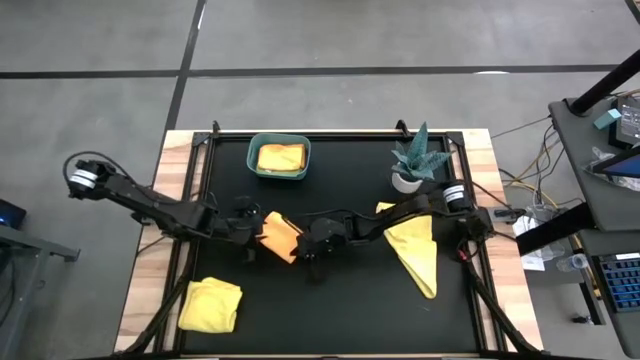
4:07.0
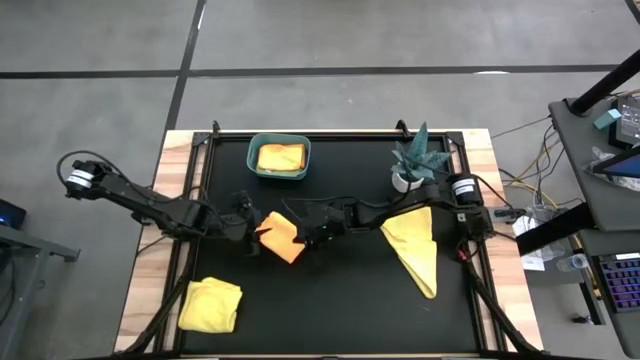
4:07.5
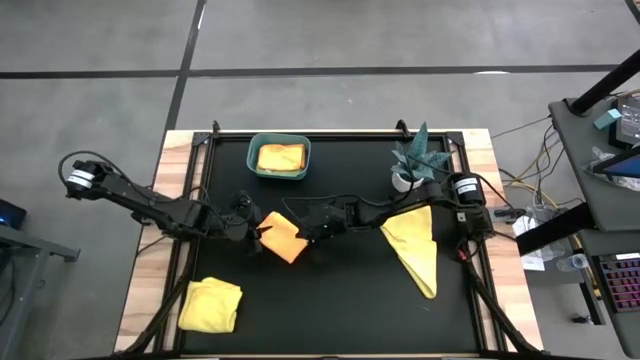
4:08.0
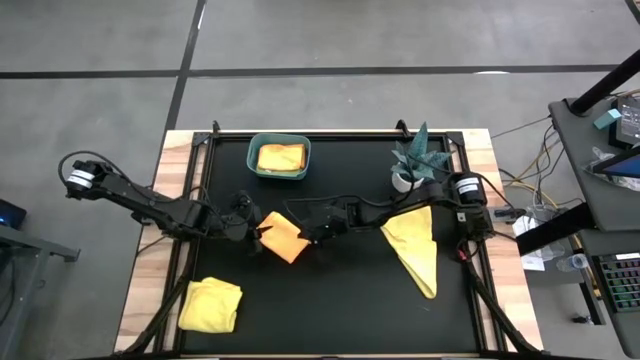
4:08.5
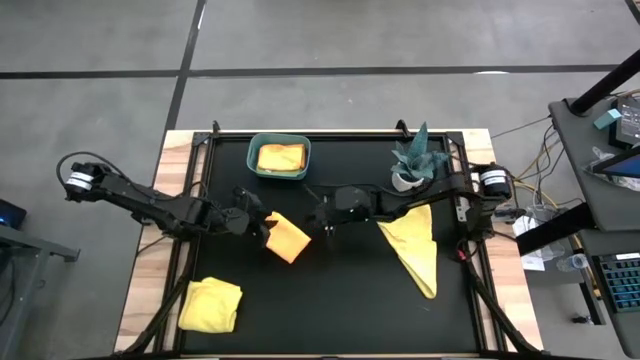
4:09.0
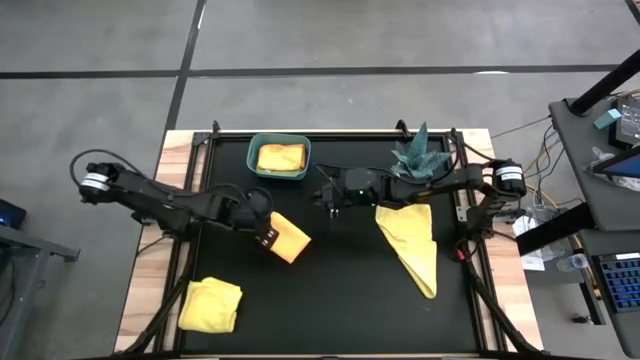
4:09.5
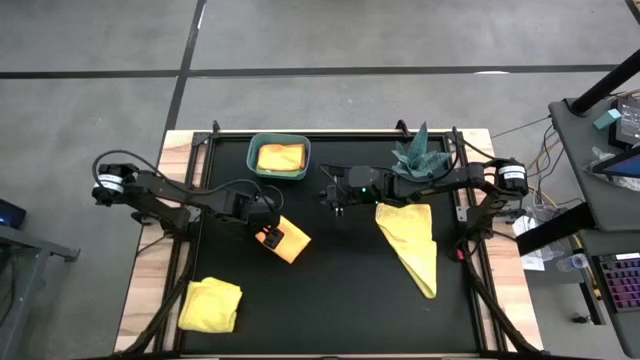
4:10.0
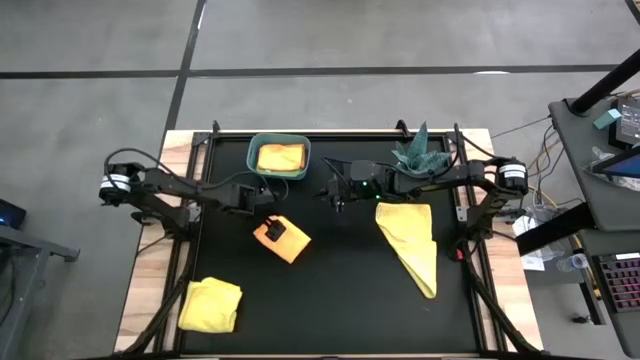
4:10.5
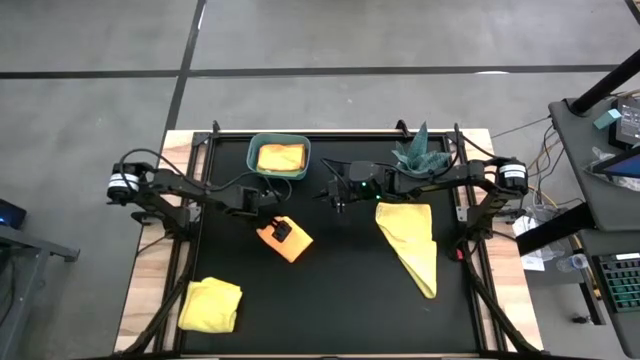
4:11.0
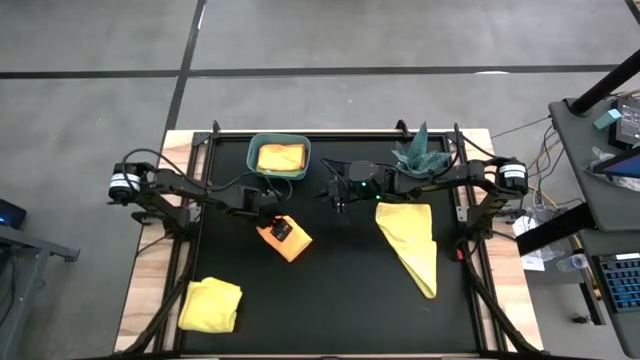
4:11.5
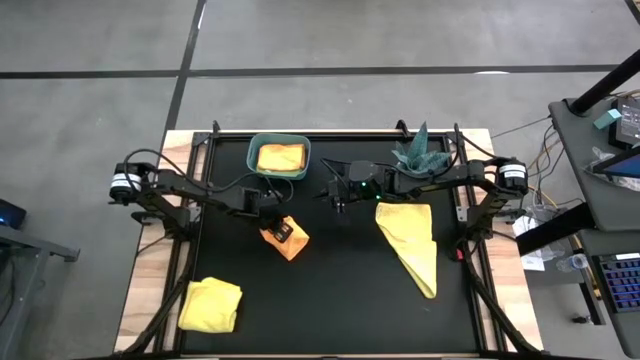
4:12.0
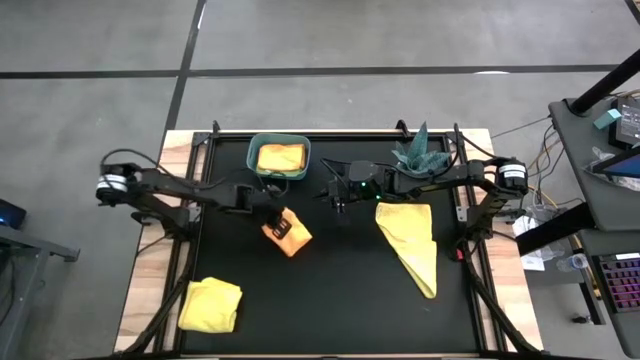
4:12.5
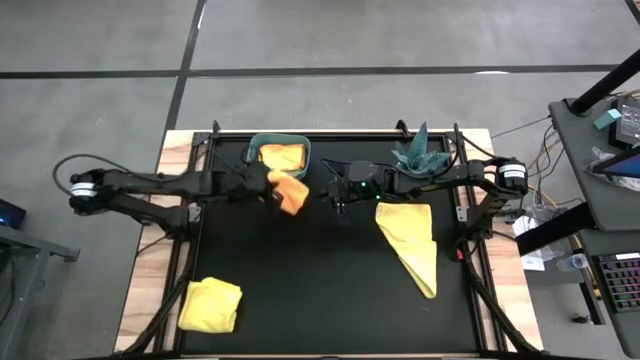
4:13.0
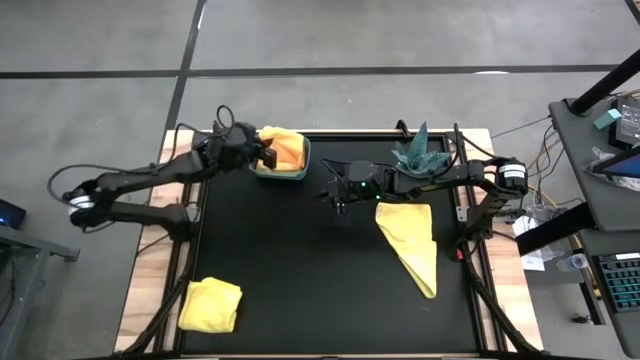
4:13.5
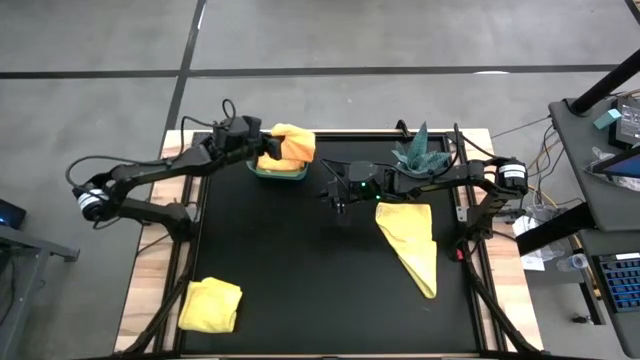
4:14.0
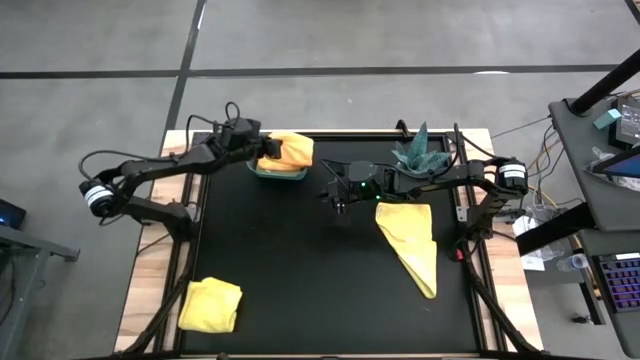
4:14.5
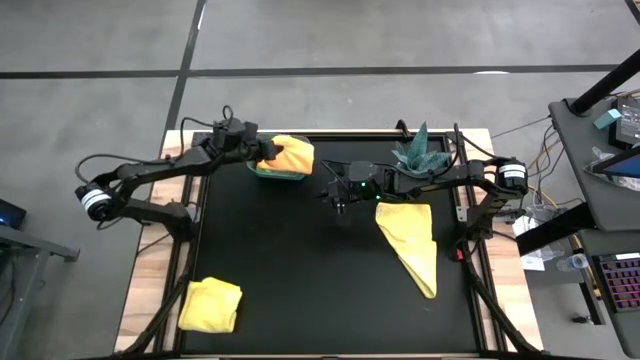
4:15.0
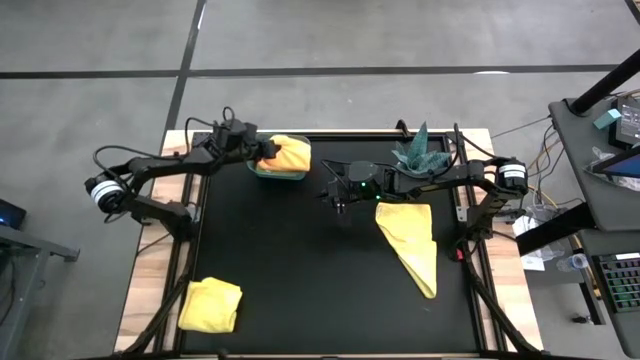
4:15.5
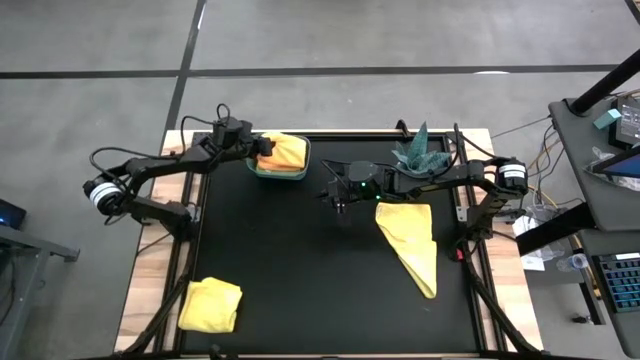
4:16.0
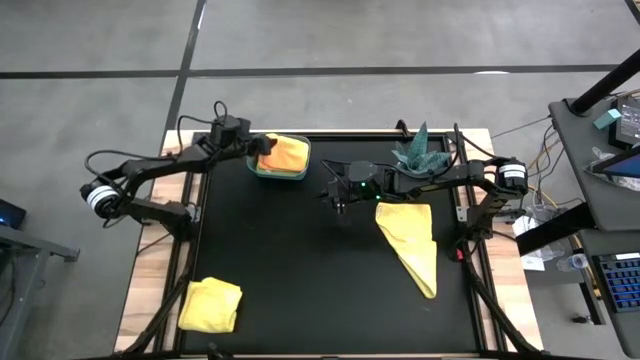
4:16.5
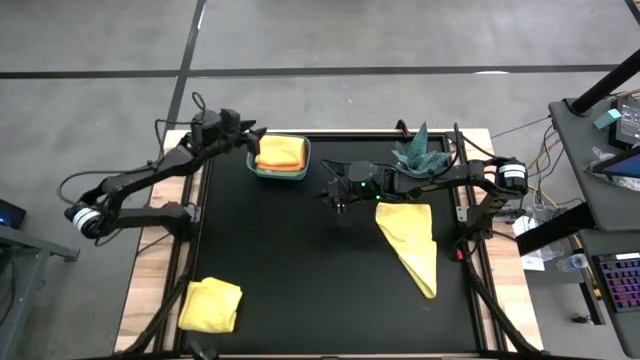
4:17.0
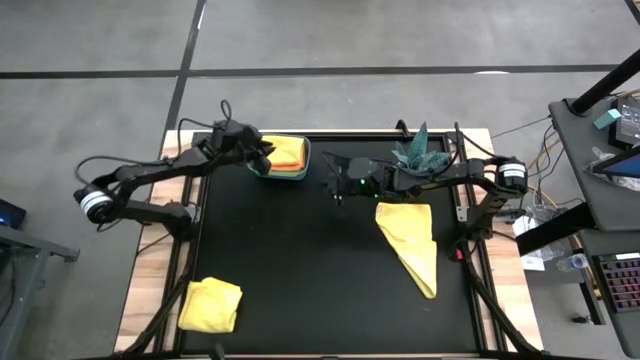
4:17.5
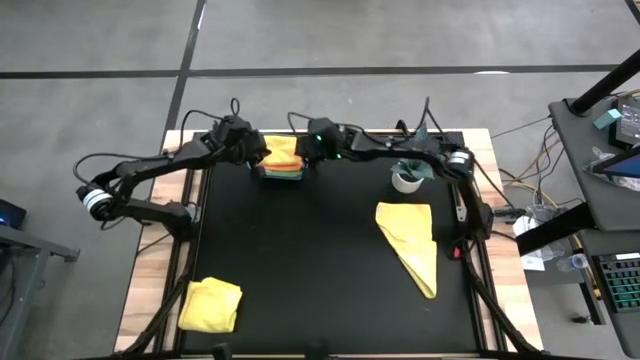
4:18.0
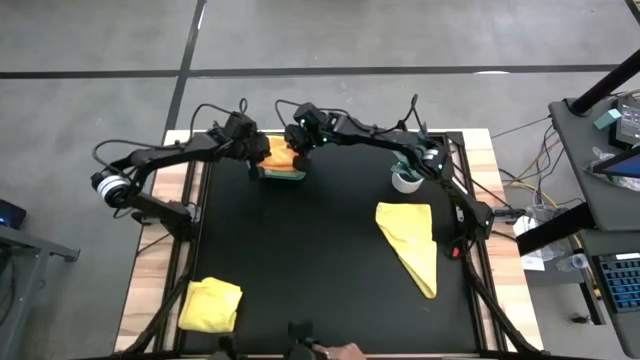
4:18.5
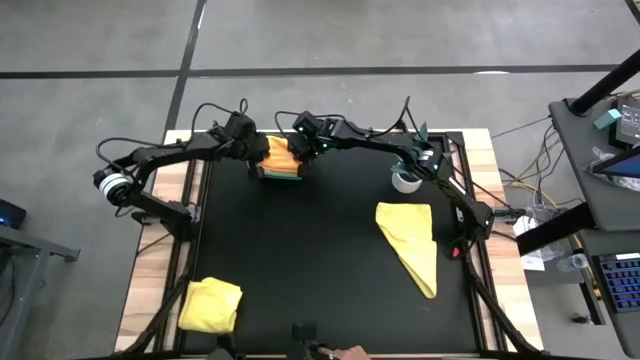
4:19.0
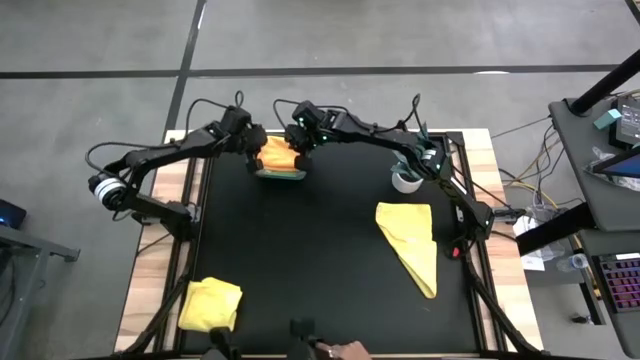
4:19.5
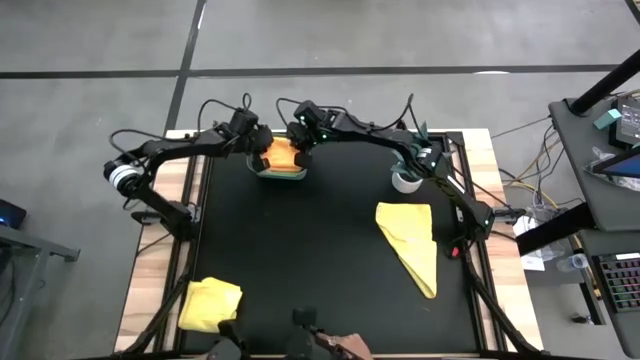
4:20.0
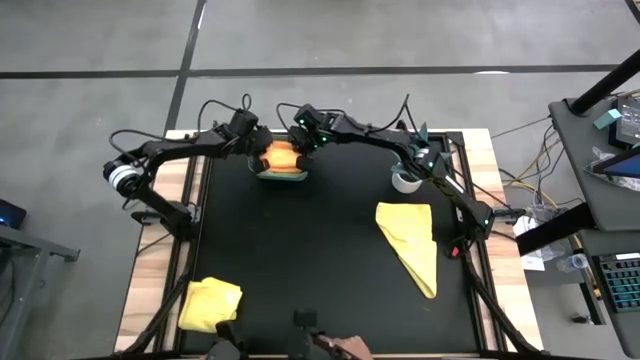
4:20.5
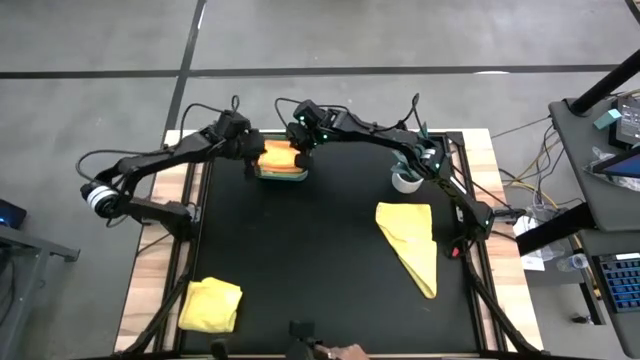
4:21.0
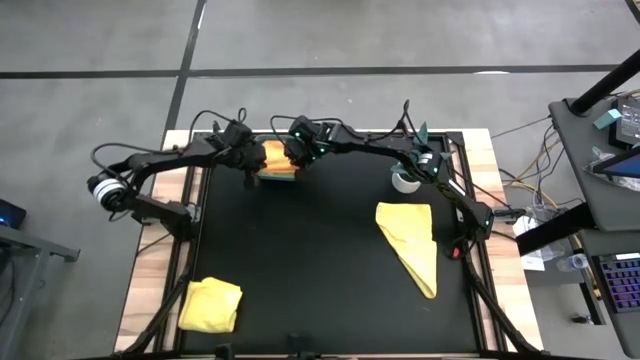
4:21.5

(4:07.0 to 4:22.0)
Task: Fold microfiber towels
Put the orange microfiber cloth into the blue bin

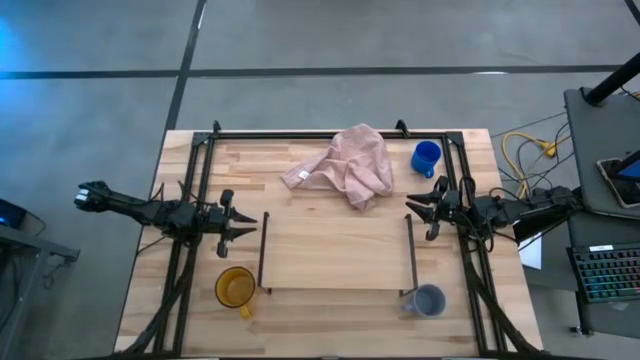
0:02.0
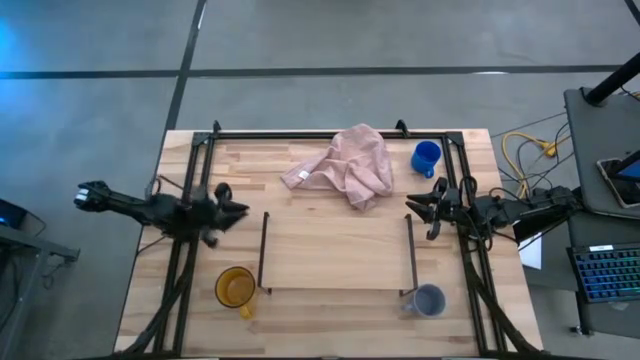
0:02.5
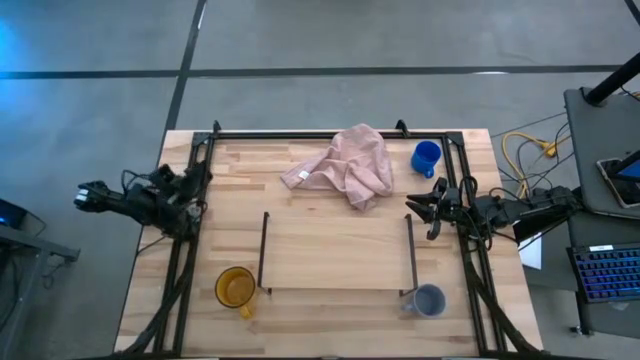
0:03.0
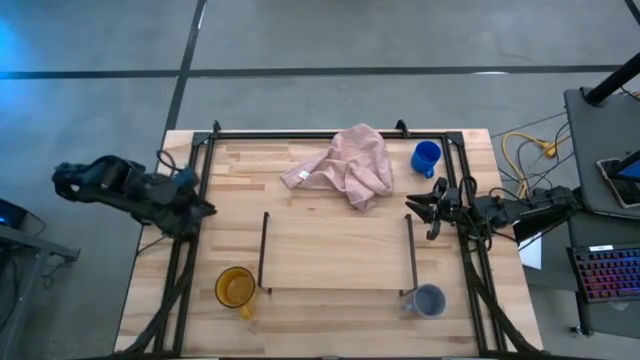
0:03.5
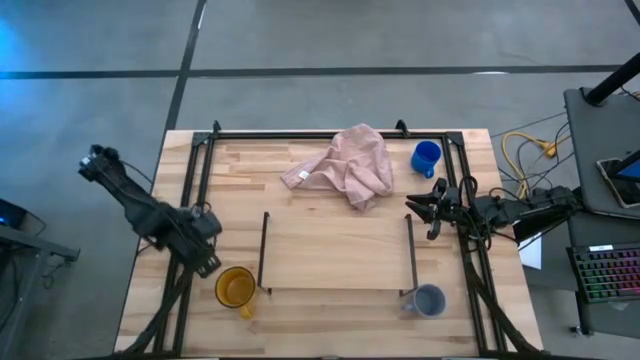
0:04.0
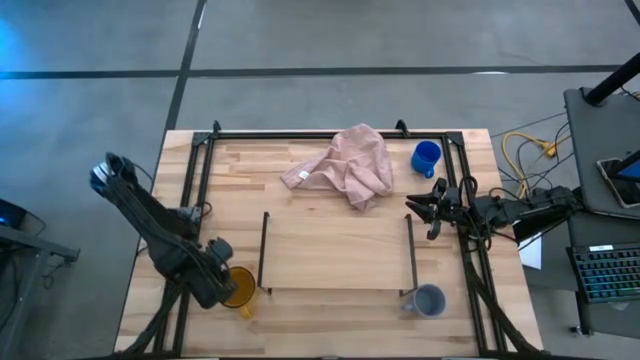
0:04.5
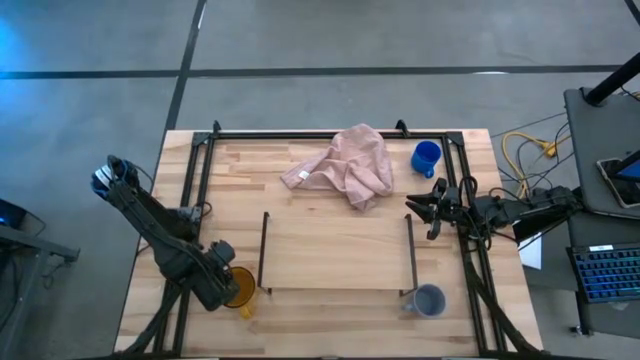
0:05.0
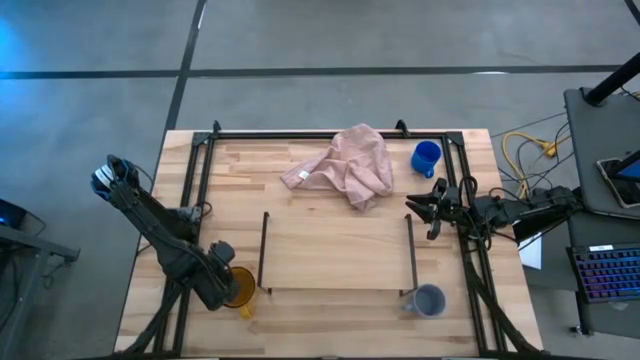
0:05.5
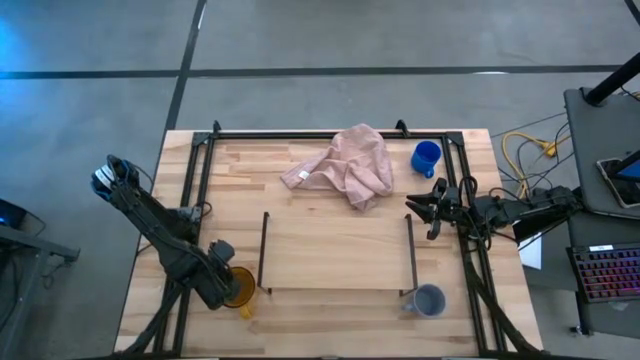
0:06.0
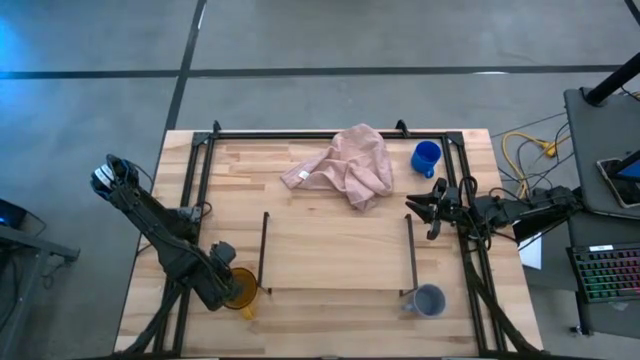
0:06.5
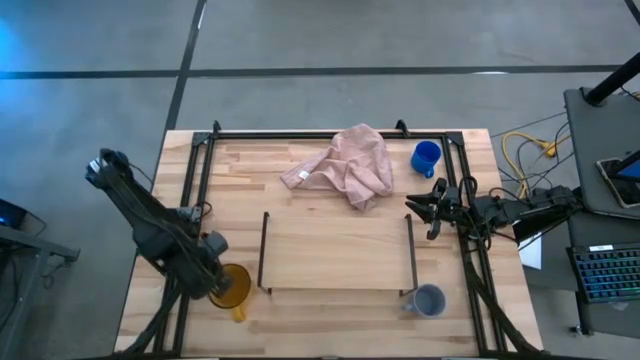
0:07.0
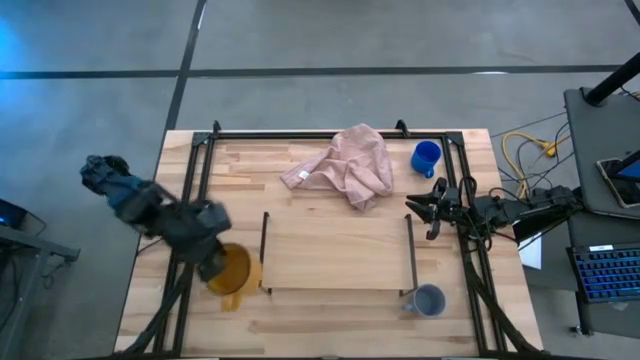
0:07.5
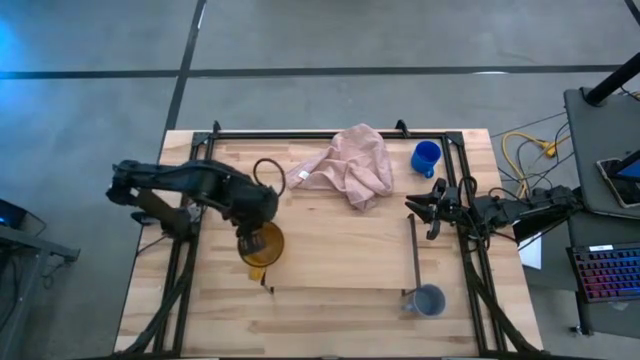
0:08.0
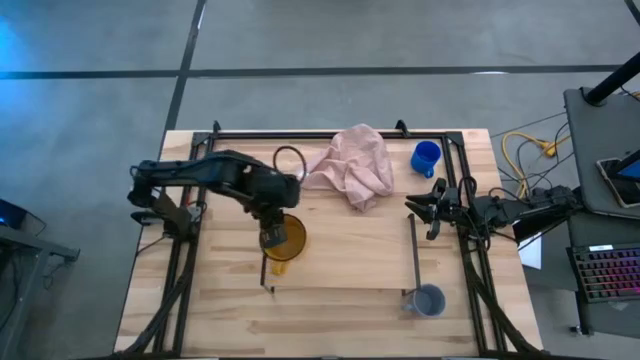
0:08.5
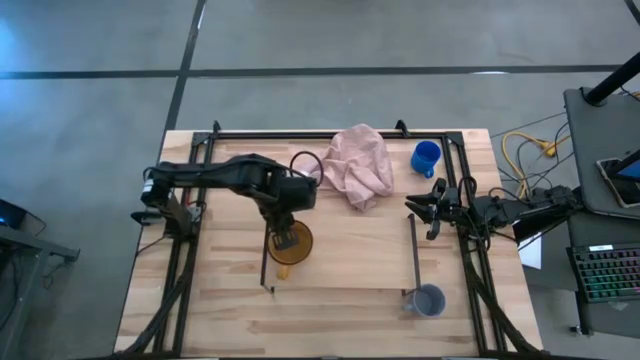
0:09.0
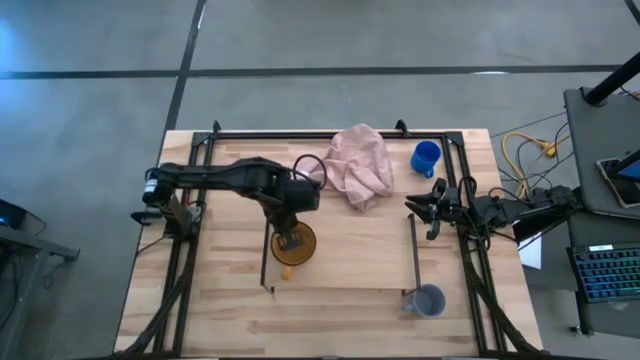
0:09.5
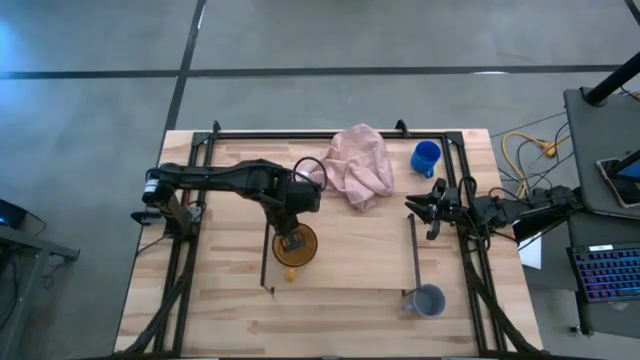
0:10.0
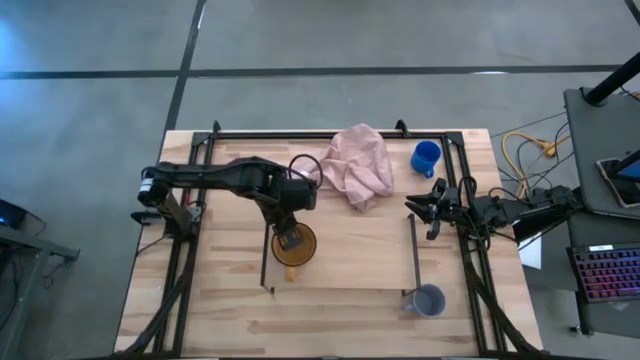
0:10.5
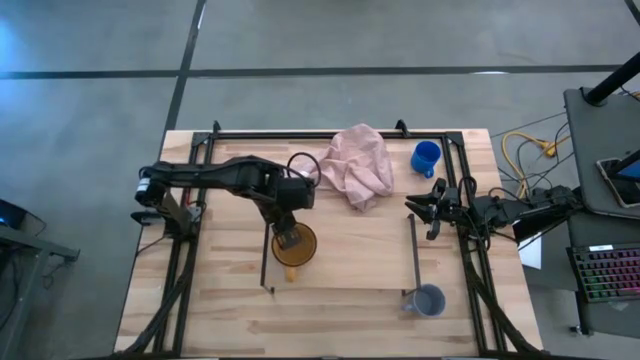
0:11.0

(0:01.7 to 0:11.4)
Task: Stack small to large cups/mugs on shelf
Put the yellow mug on the shelf
